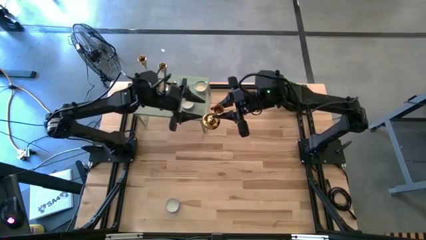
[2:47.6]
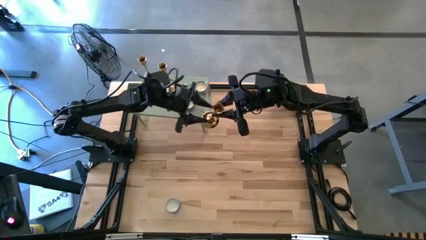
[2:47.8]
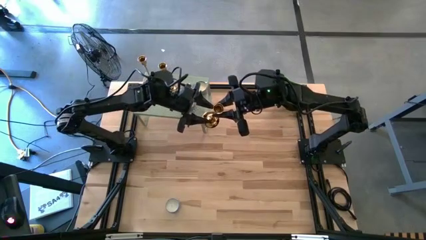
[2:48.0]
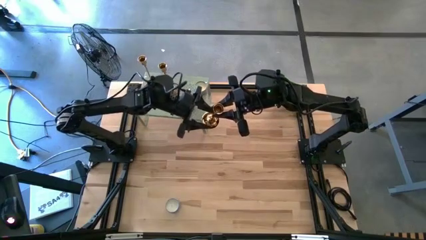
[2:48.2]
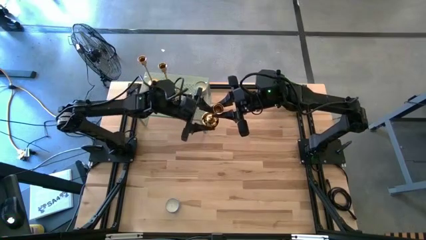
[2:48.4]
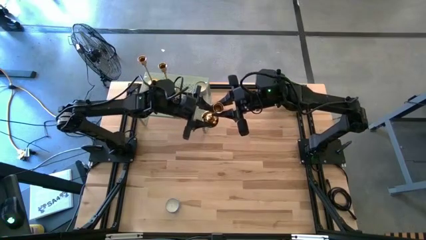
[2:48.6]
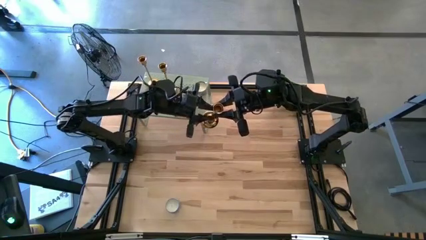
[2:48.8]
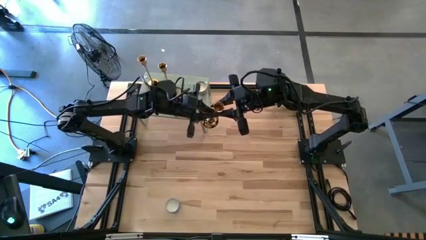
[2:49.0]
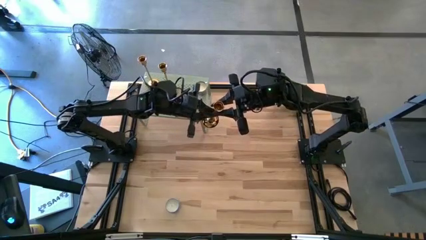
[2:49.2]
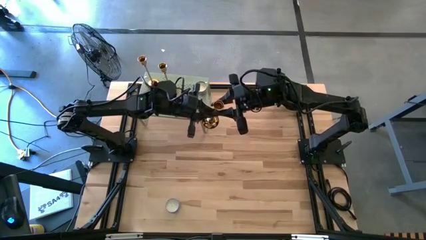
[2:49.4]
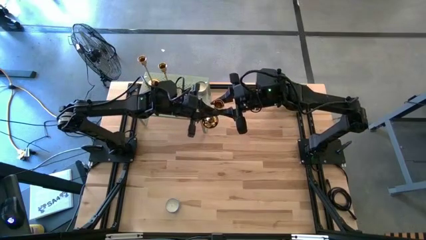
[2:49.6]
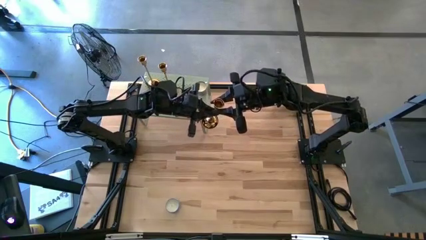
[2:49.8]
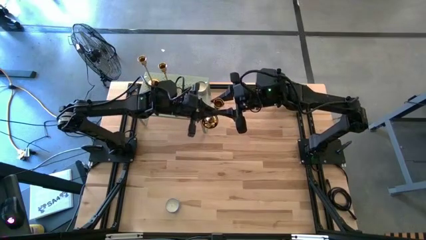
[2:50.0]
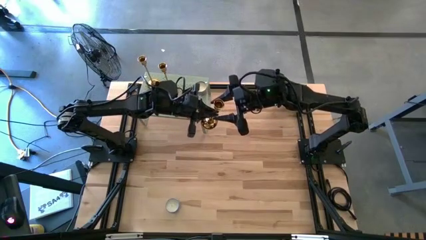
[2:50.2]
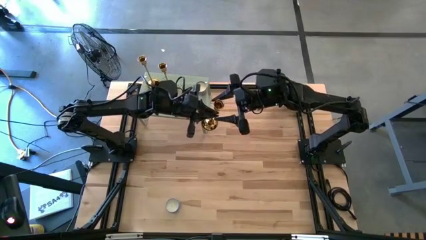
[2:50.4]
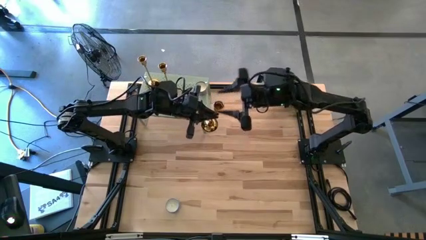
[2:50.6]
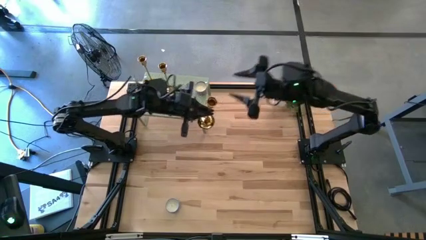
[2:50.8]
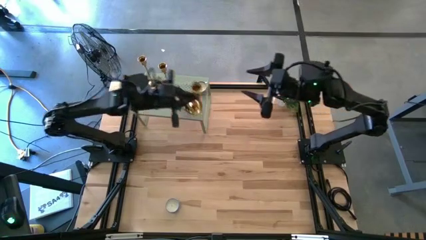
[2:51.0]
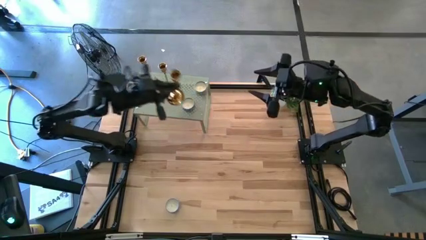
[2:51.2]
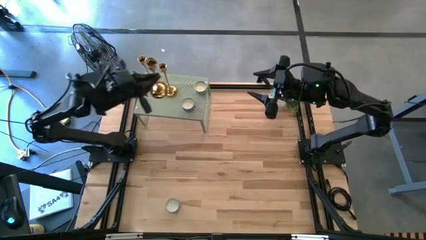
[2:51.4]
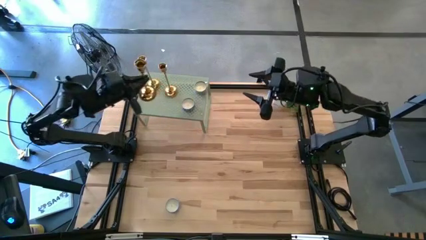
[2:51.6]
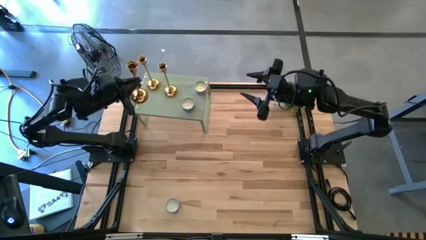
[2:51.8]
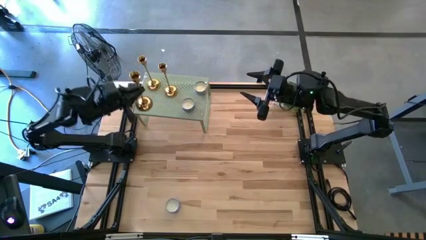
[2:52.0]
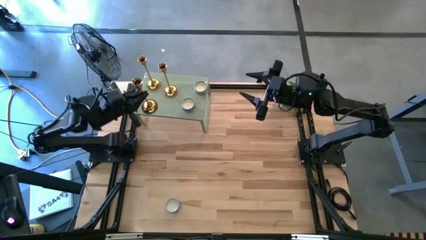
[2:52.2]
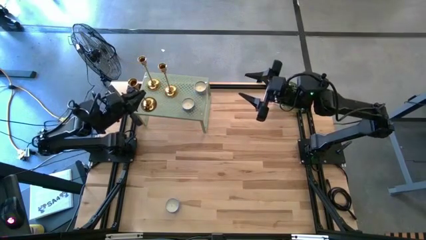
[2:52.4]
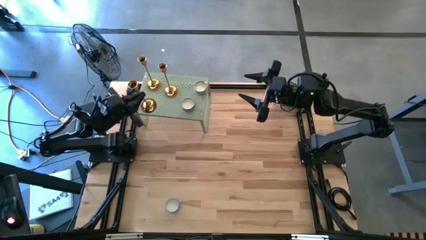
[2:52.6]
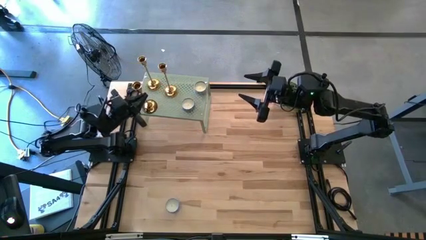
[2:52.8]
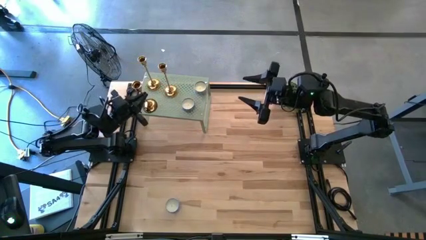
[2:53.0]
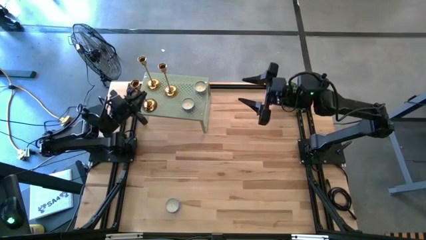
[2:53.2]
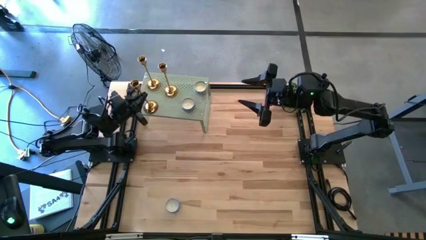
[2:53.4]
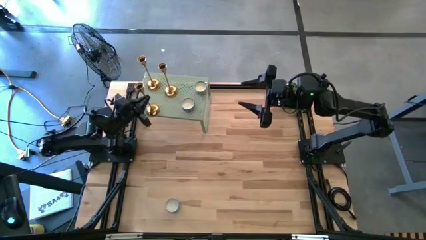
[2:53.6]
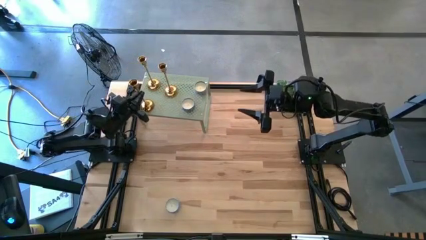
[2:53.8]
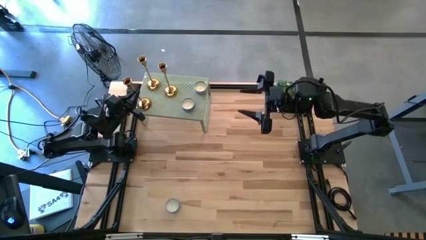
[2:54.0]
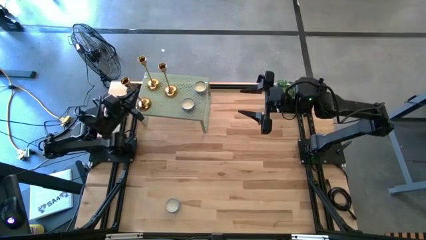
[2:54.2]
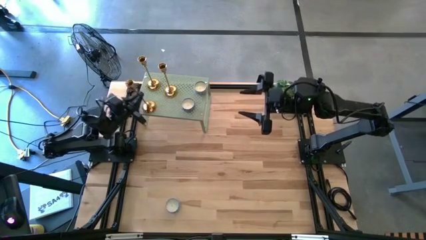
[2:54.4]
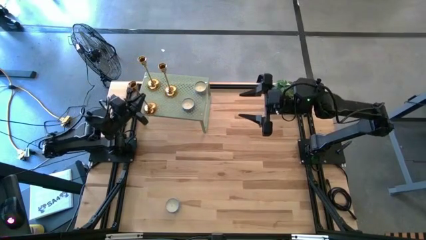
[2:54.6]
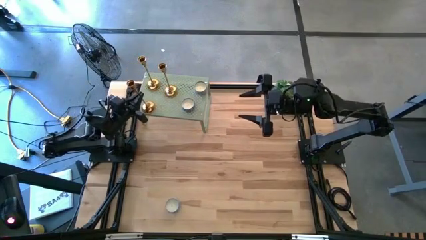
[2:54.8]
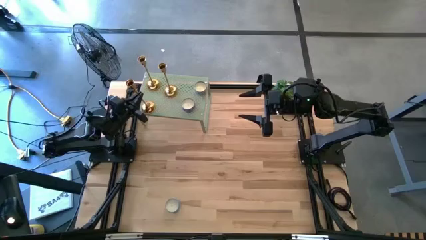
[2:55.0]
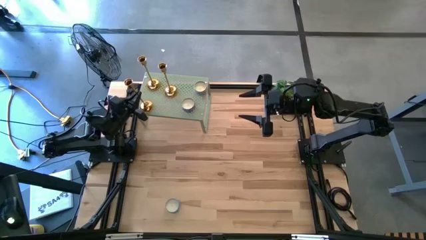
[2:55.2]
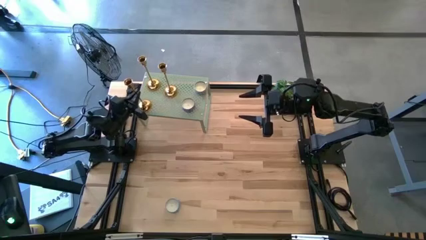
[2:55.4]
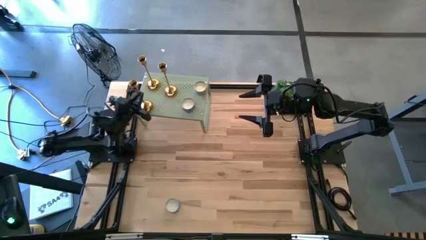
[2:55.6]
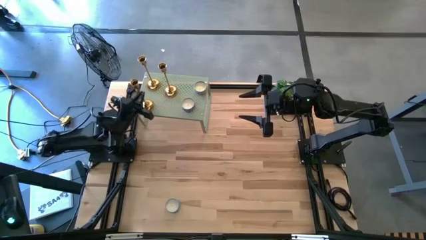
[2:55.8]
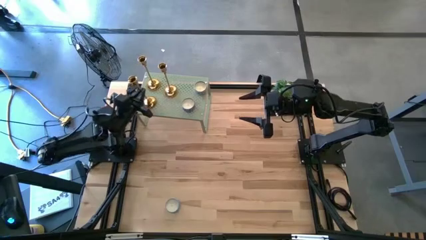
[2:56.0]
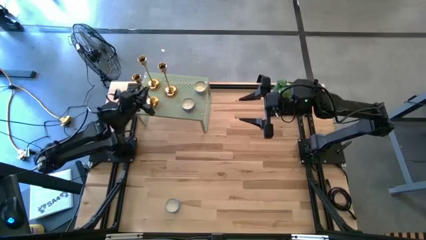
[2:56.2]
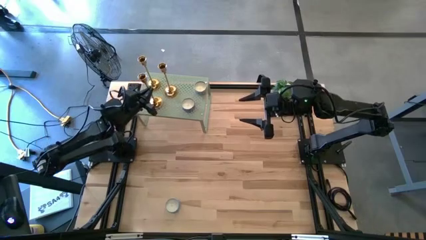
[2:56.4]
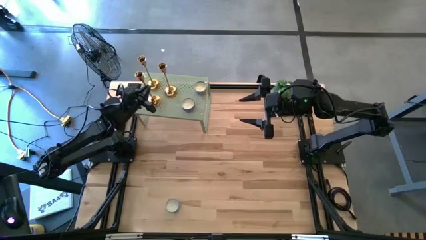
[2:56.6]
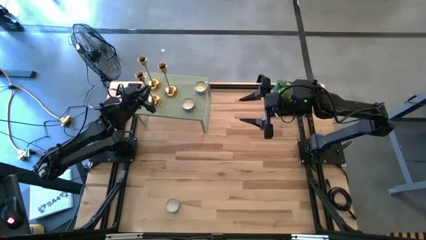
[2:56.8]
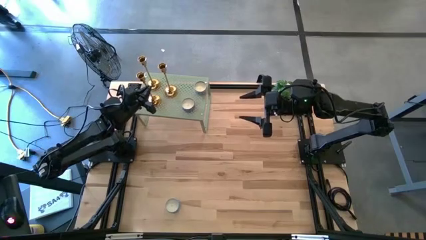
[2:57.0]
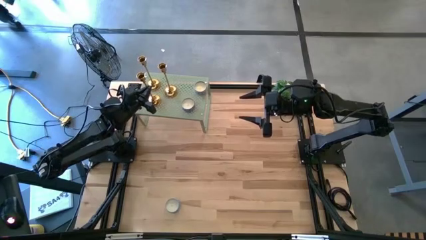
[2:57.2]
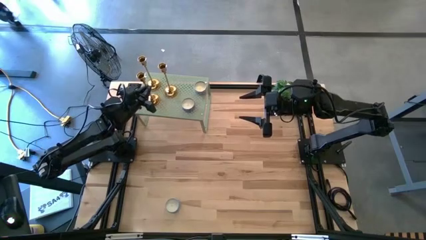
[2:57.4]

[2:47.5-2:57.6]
Task: Pick & Place candle stick holders
Put the gold candle holder on the shelf

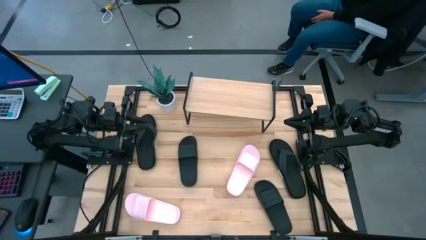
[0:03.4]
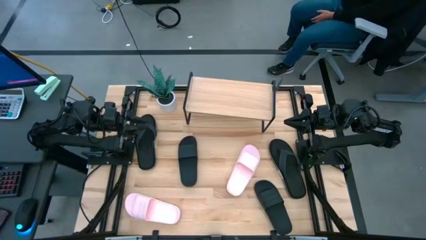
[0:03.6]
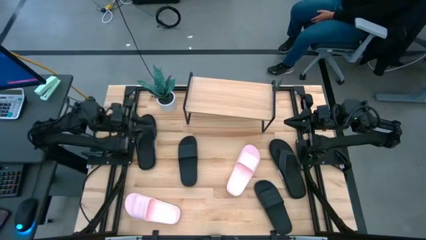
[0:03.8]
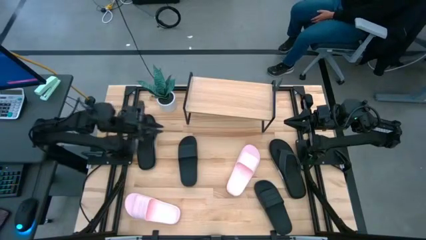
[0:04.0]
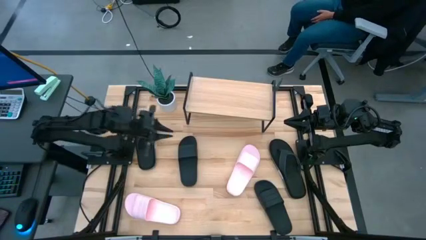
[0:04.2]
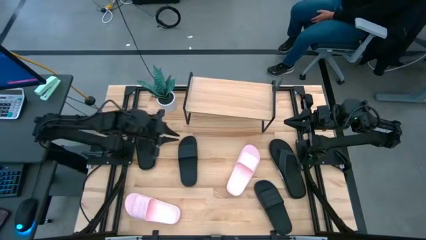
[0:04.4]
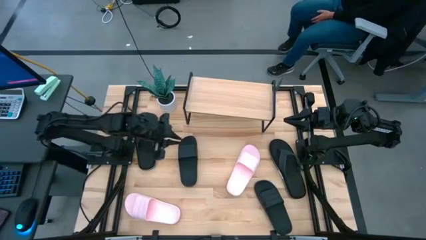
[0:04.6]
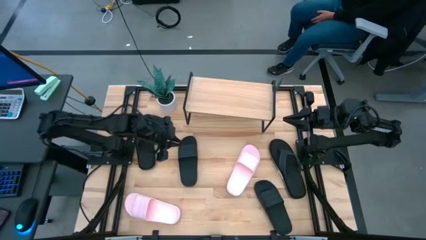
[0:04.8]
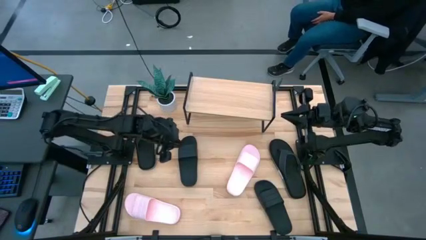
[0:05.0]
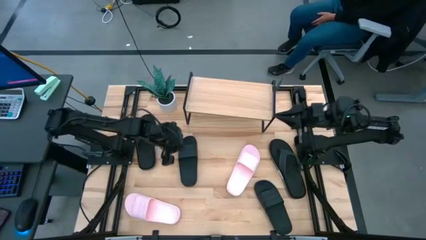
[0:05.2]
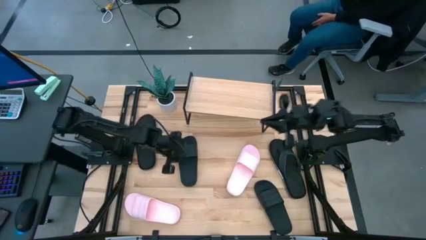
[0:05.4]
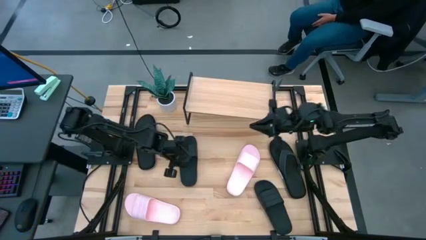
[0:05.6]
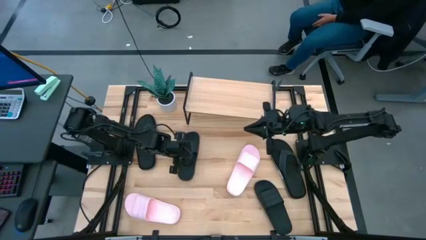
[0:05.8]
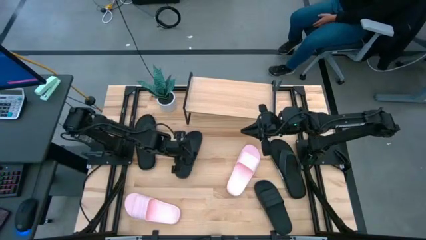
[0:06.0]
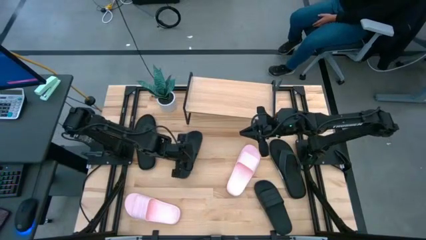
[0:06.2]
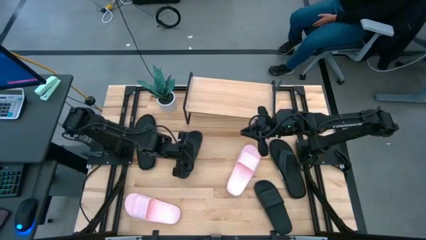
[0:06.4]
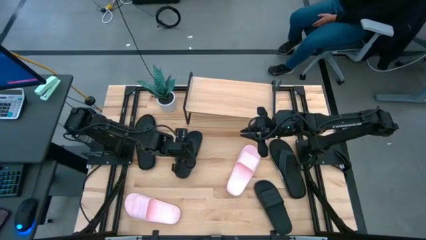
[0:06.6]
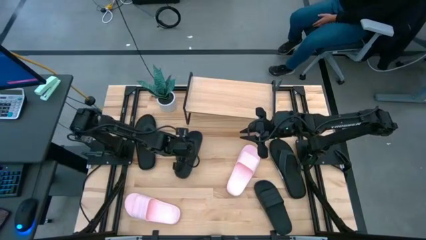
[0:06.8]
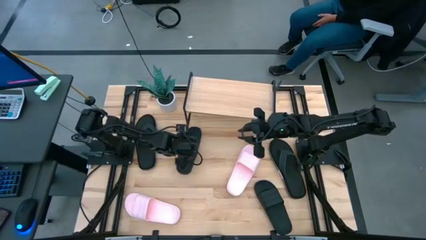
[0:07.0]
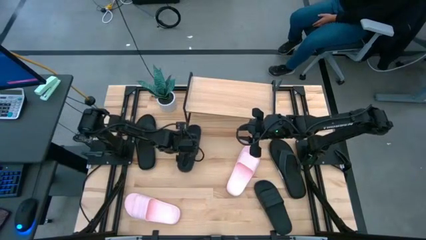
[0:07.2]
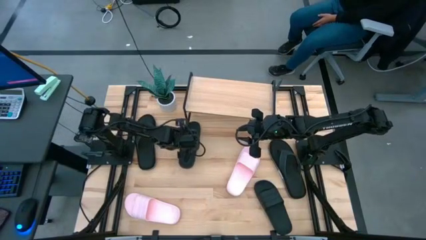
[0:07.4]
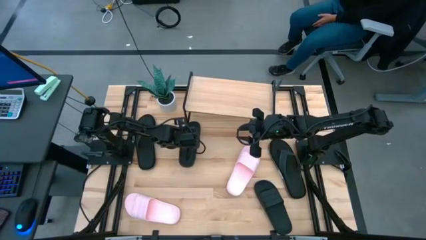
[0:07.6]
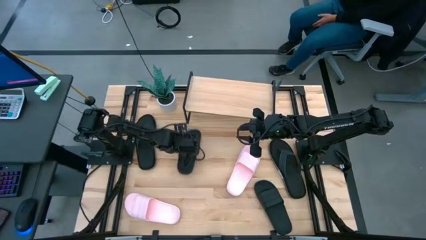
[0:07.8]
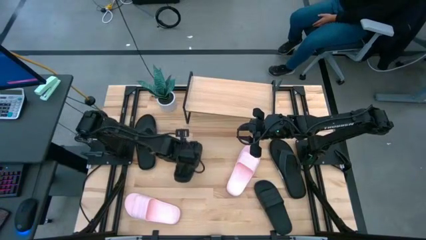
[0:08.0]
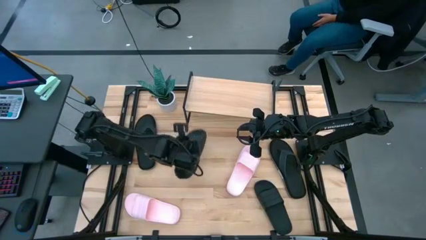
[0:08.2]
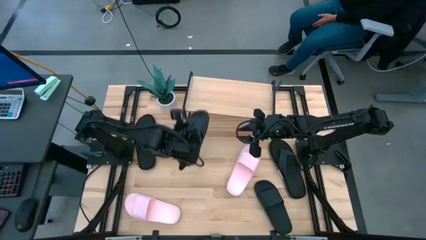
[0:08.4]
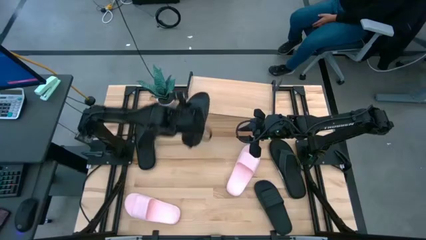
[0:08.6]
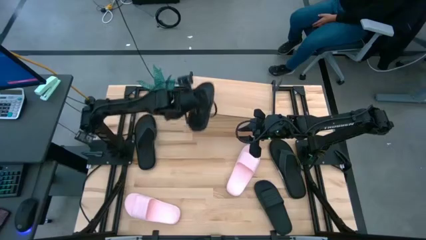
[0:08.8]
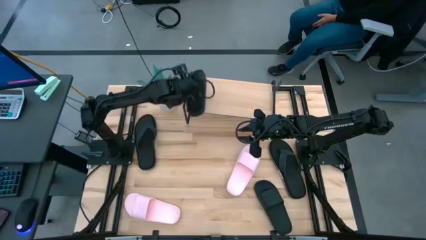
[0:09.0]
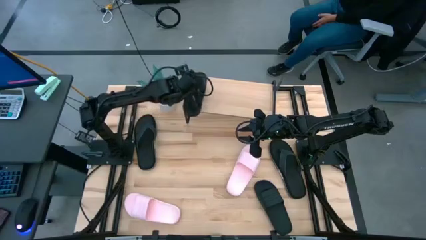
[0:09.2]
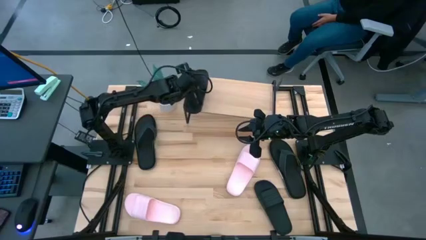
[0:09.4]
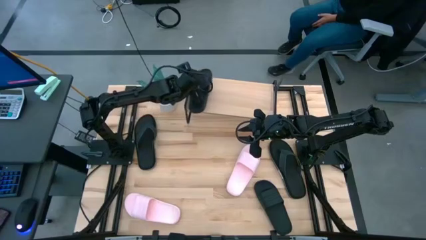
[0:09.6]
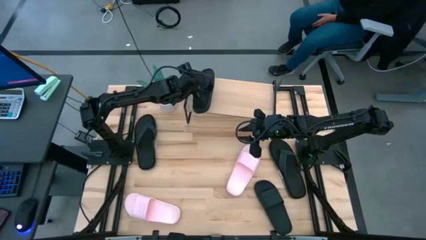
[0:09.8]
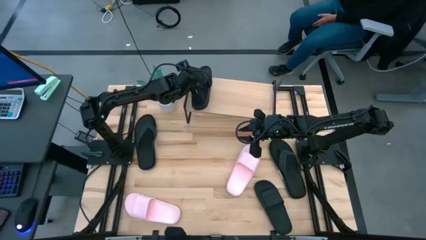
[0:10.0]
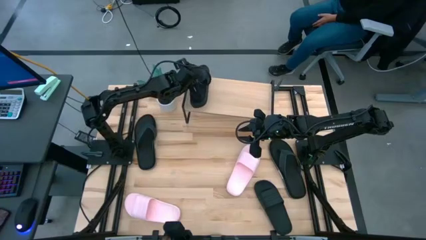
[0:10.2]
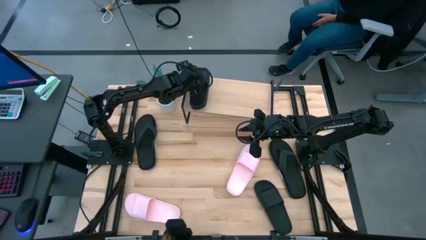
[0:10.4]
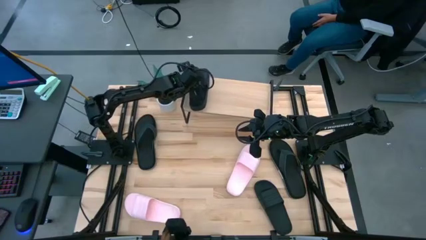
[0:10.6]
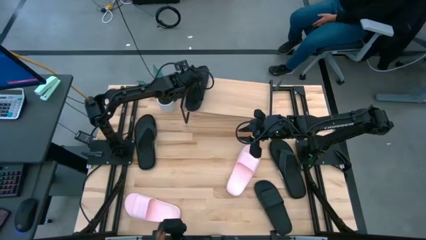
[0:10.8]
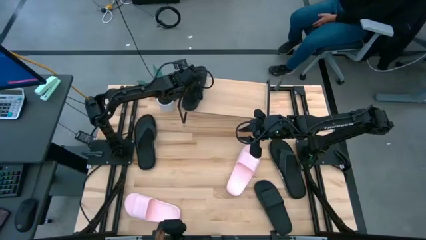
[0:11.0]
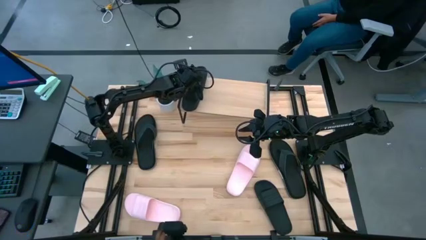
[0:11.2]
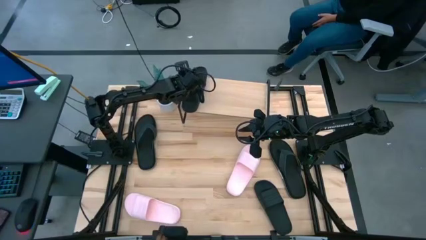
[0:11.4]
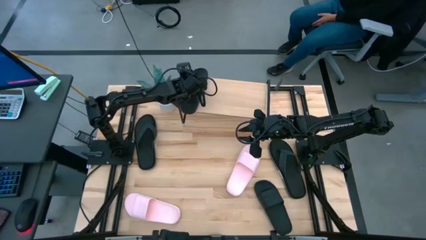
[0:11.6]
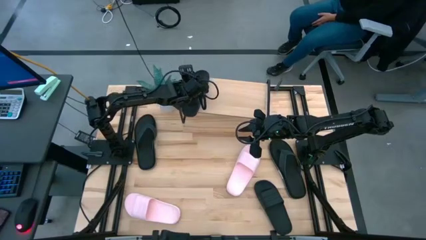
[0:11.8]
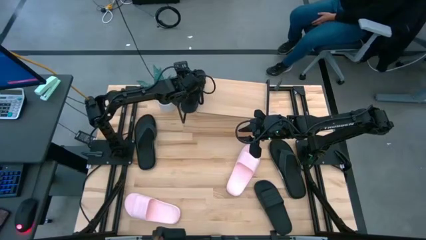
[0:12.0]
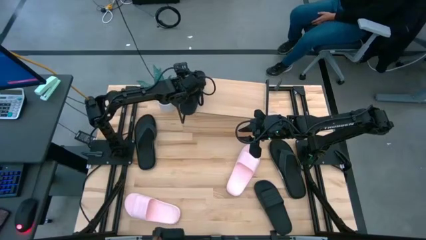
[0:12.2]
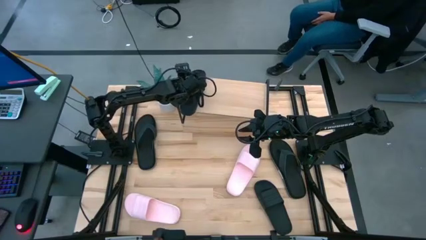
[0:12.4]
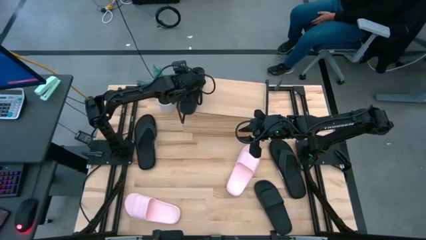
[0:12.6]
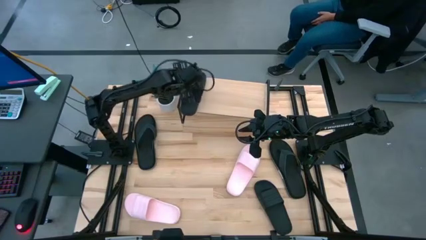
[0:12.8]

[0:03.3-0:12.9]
Task: Pick and place slides into the shelf
Put the left black slide on the shelf
